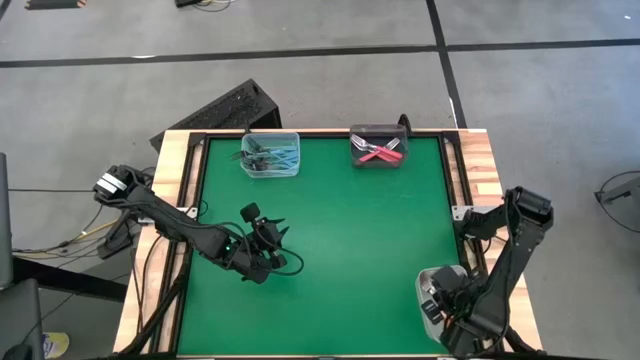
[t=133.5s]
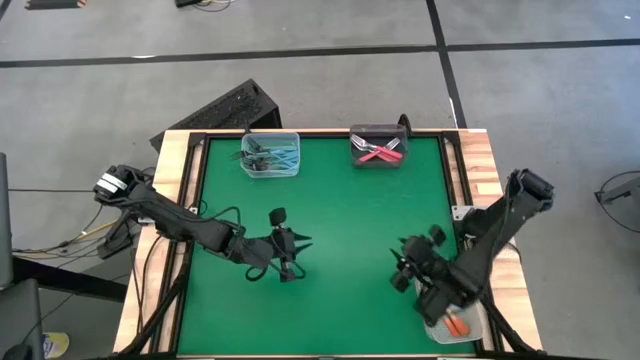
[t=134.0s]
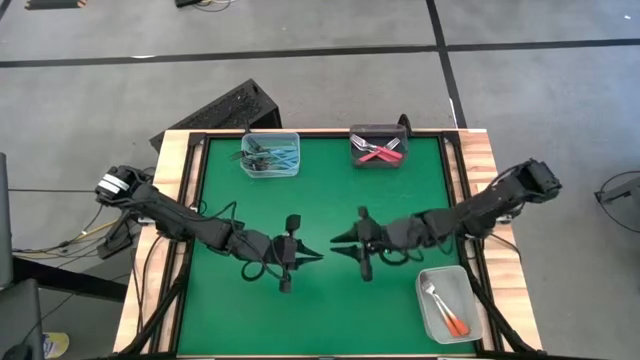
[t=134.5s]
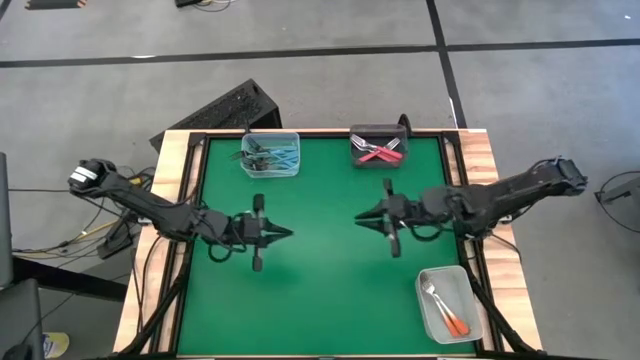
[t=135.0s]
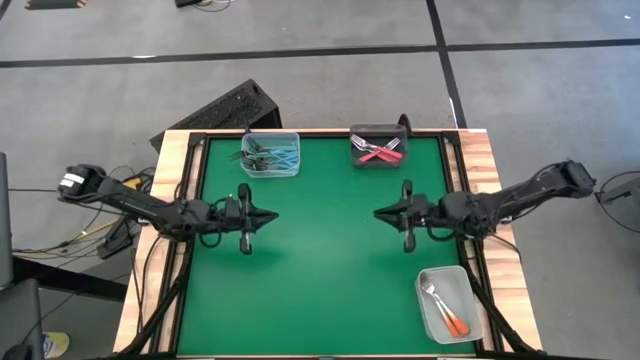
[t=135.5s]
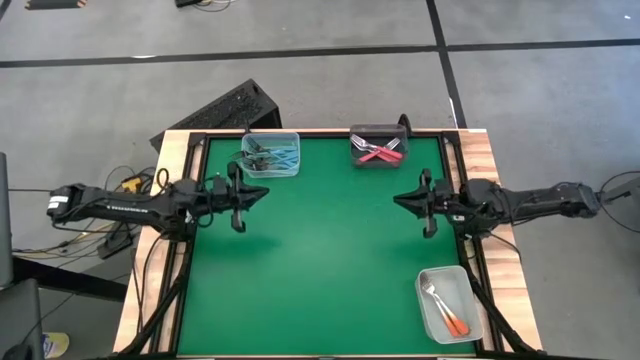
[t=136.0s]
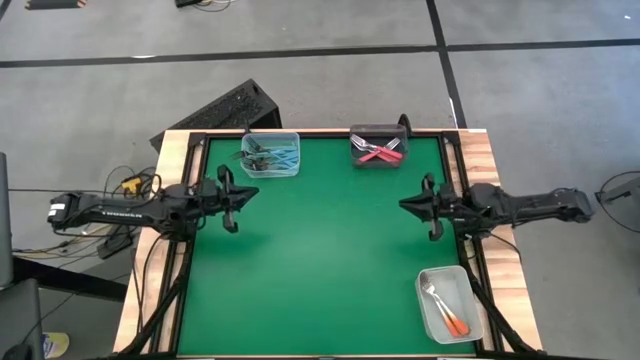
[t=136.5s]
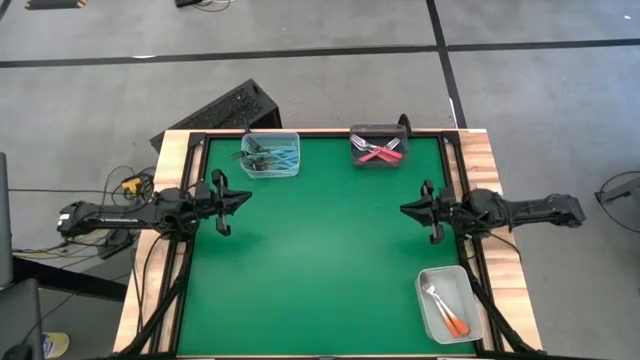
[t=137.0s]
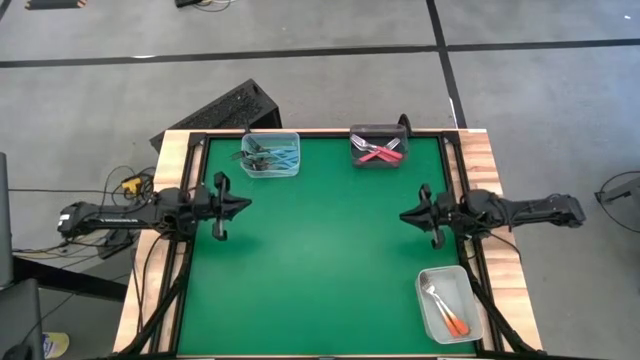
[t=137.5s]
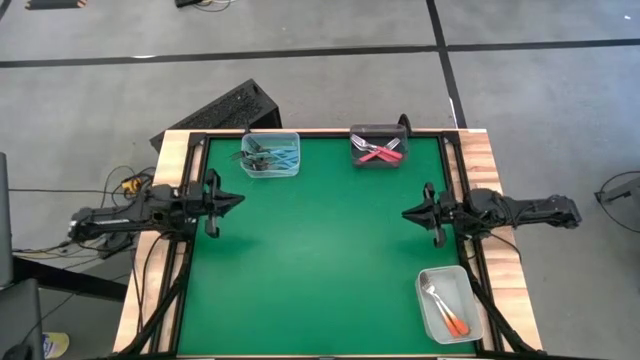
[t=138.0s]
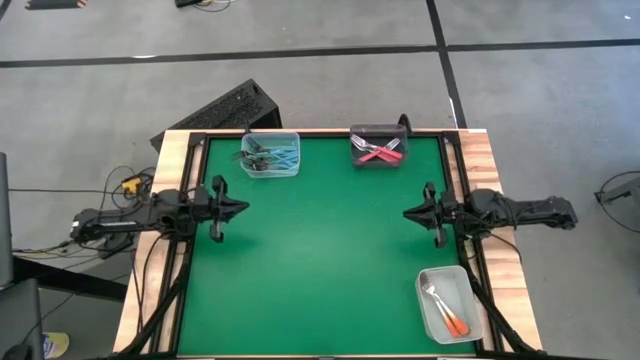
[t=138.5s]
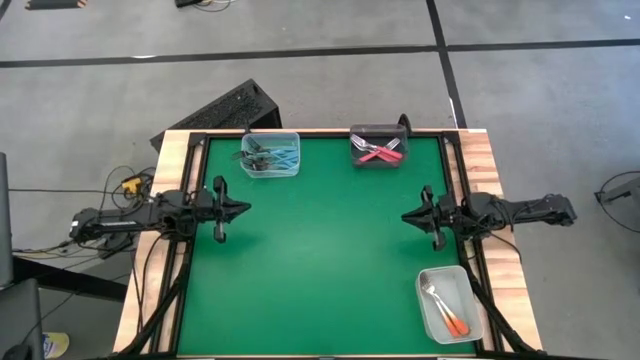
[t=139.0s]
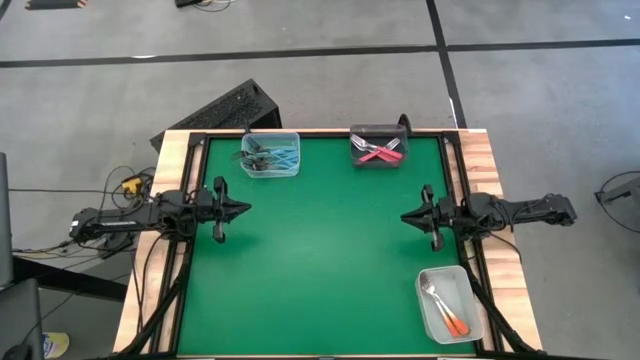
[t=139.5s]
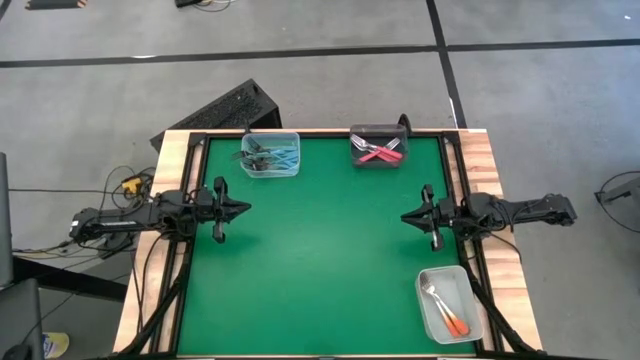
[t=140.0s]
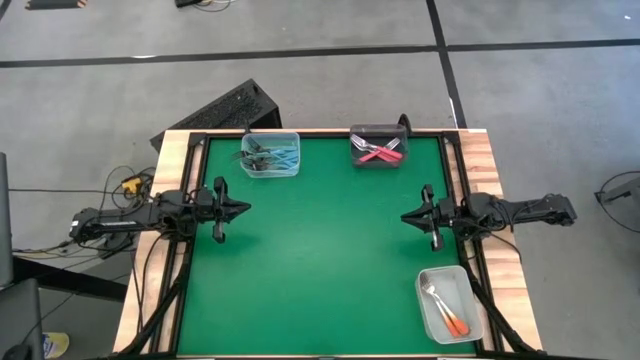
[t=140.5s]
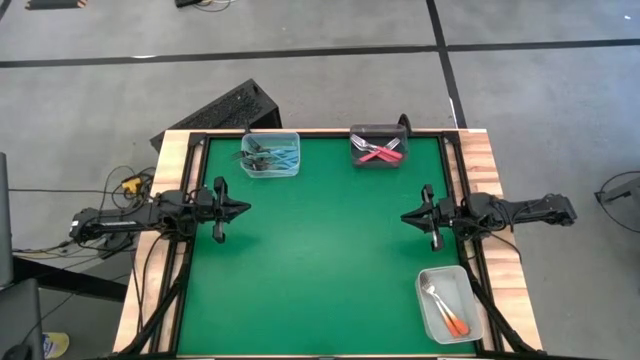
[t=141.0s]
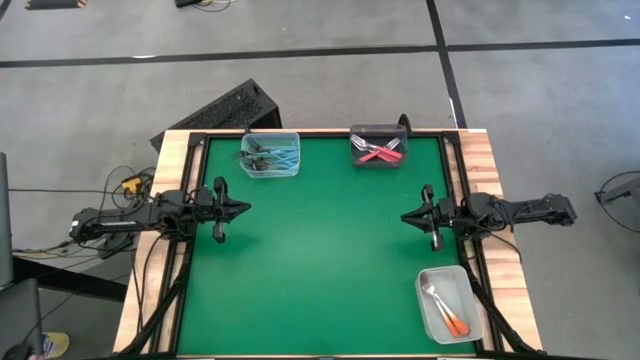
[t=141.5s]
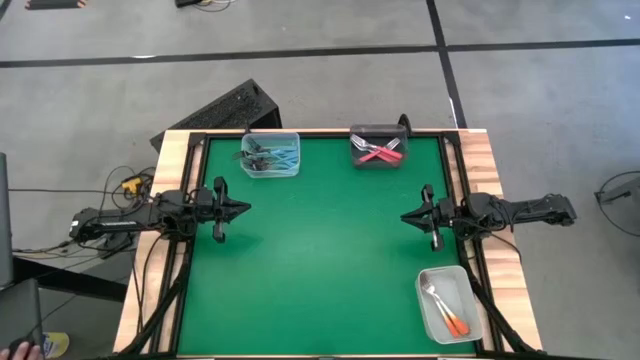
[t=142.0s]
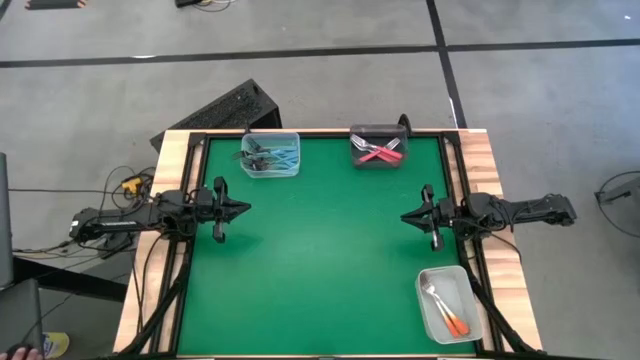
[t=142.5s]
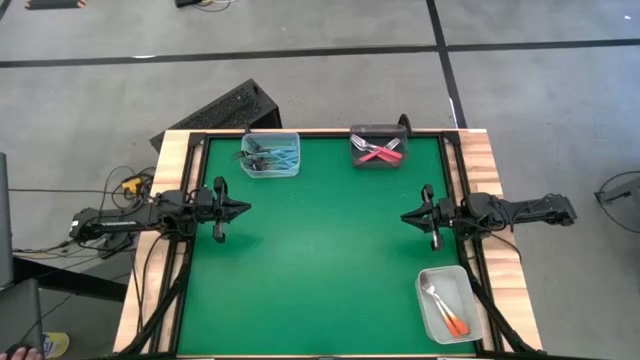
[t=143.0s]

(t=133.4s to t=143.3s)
Task: Sort silverware by color (type)
Return to Home Position

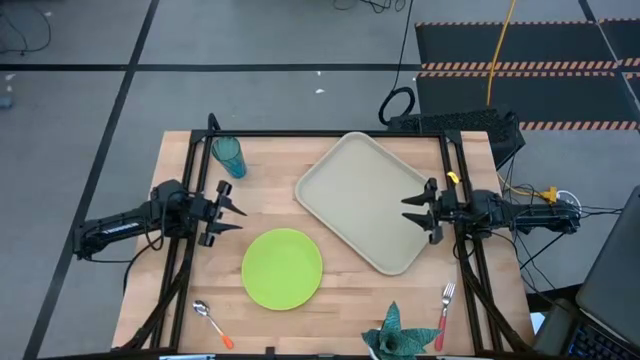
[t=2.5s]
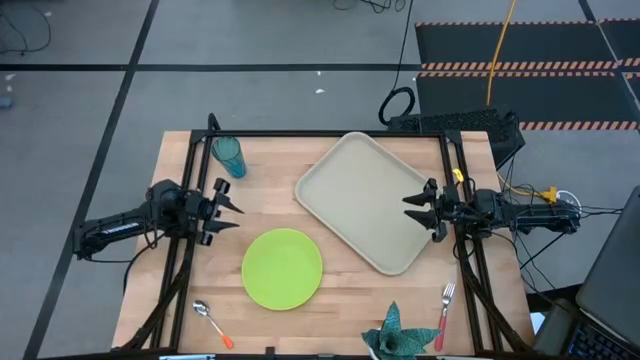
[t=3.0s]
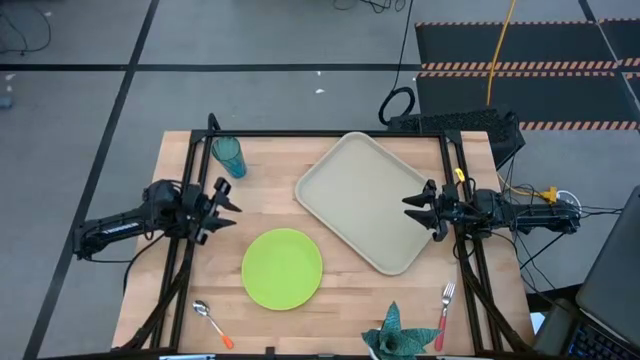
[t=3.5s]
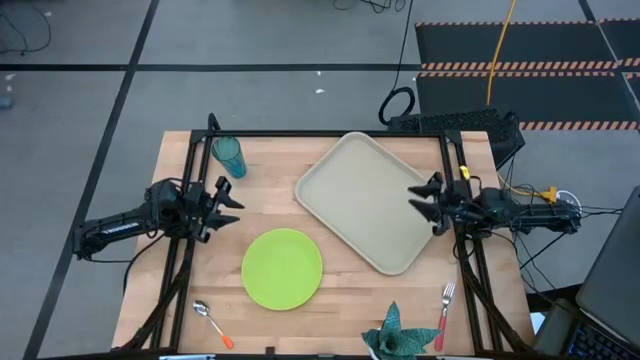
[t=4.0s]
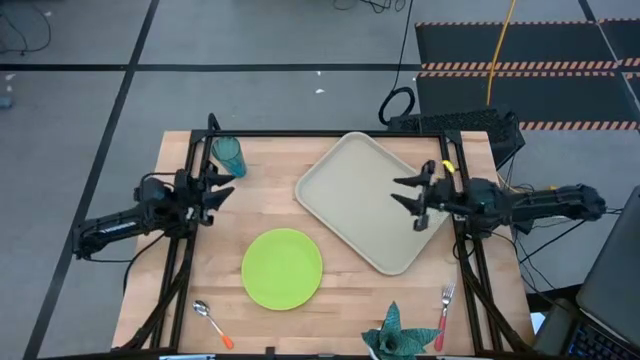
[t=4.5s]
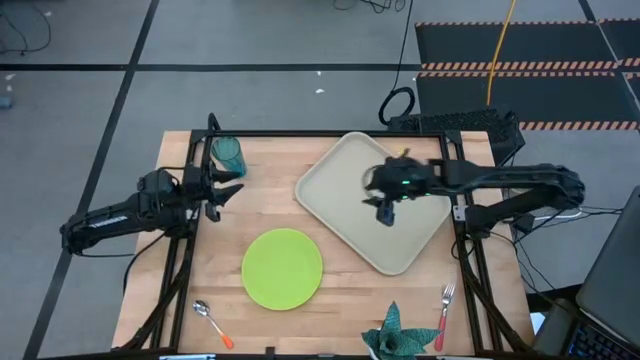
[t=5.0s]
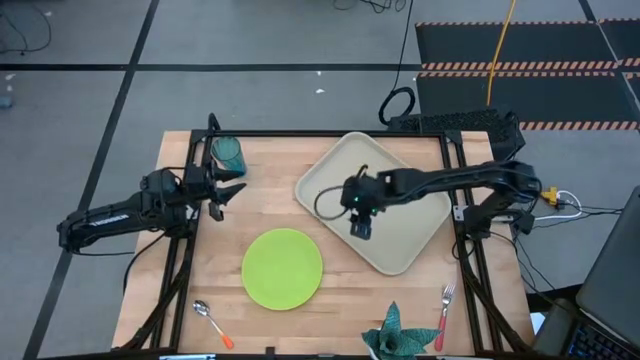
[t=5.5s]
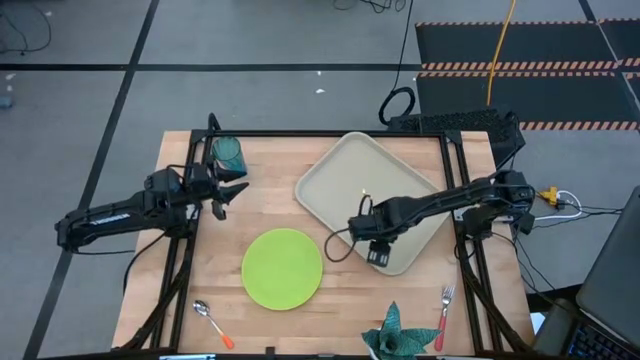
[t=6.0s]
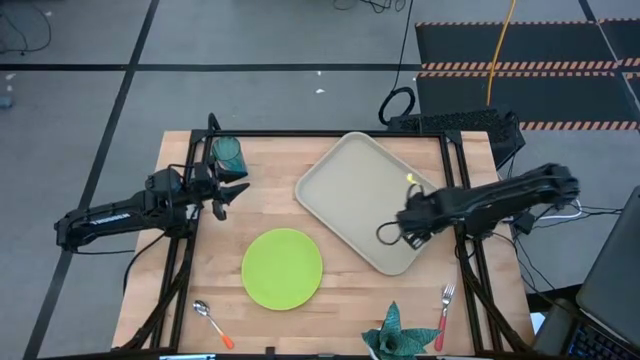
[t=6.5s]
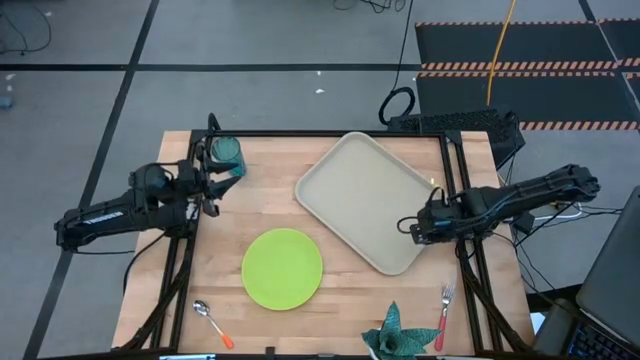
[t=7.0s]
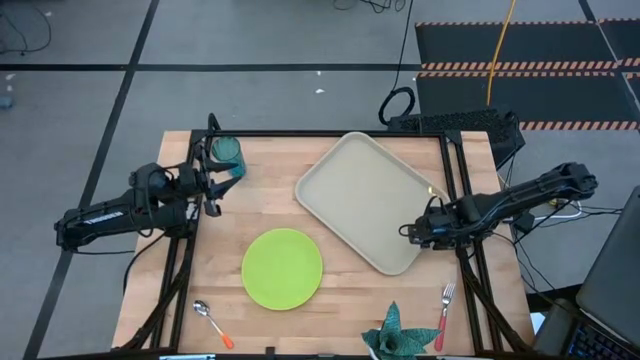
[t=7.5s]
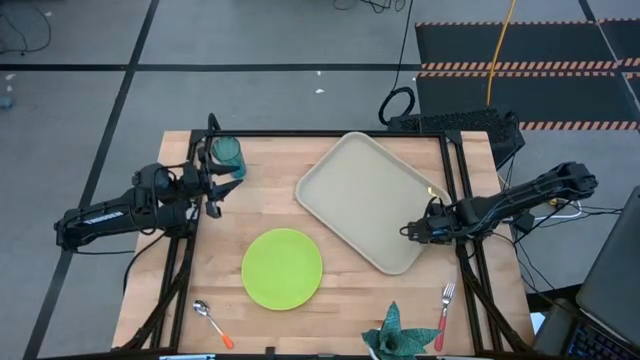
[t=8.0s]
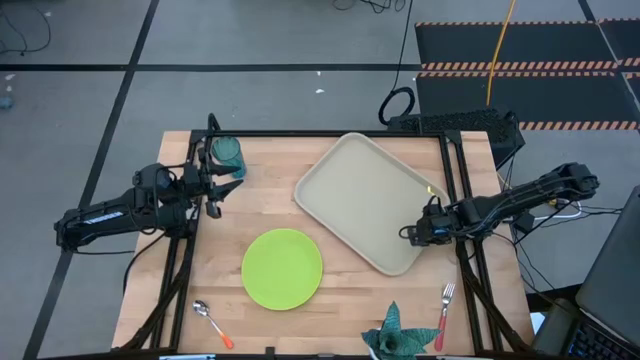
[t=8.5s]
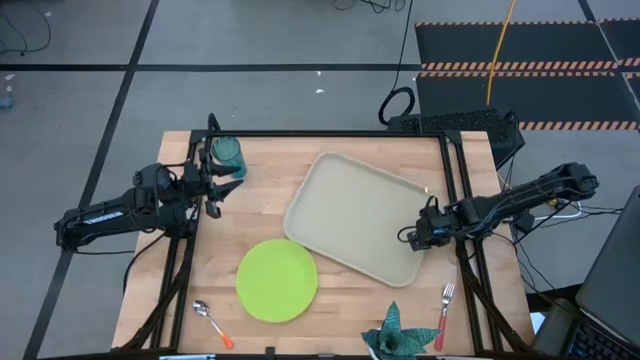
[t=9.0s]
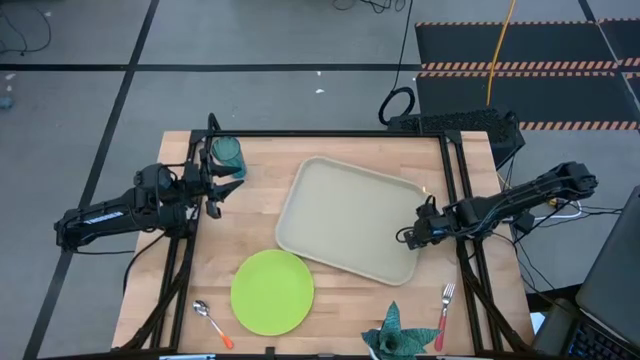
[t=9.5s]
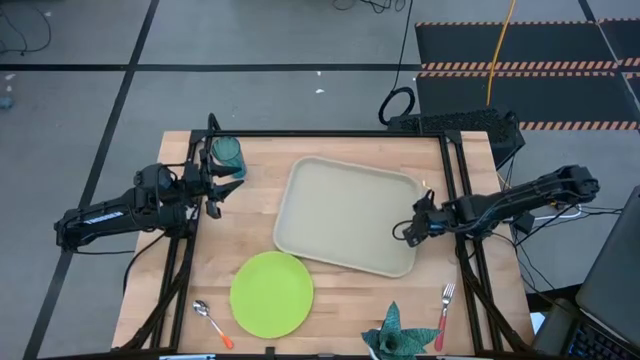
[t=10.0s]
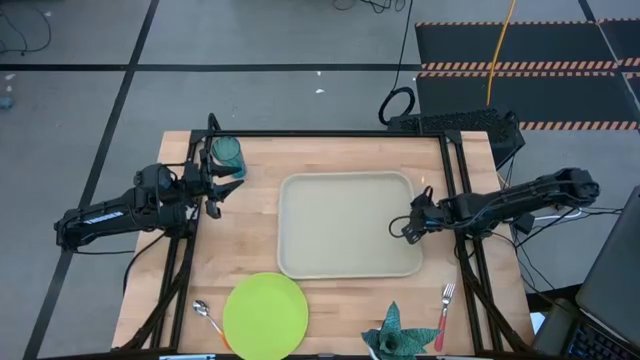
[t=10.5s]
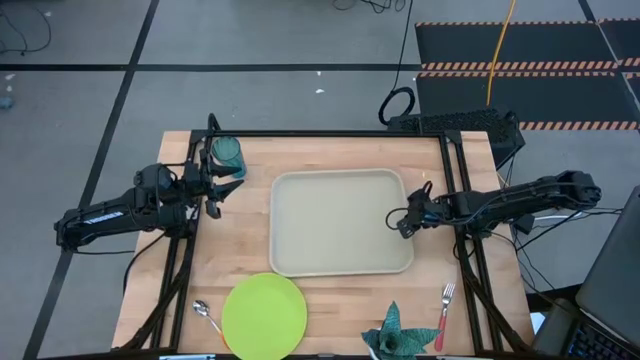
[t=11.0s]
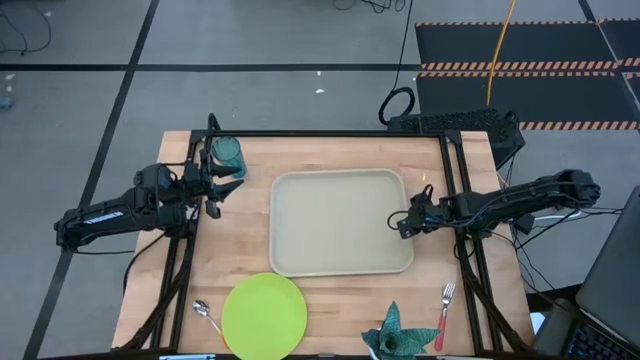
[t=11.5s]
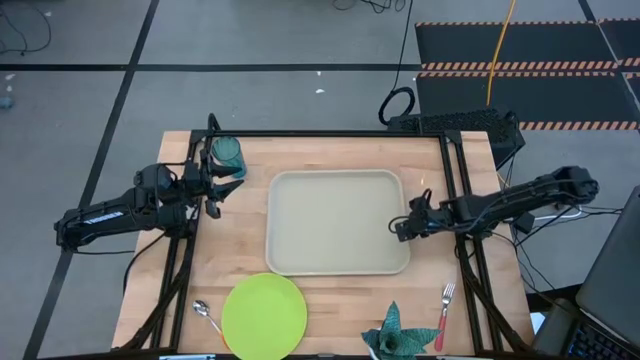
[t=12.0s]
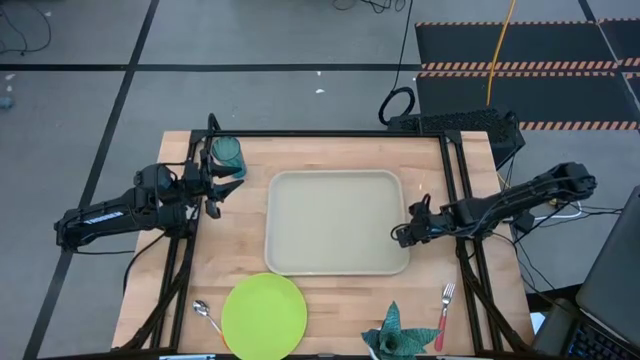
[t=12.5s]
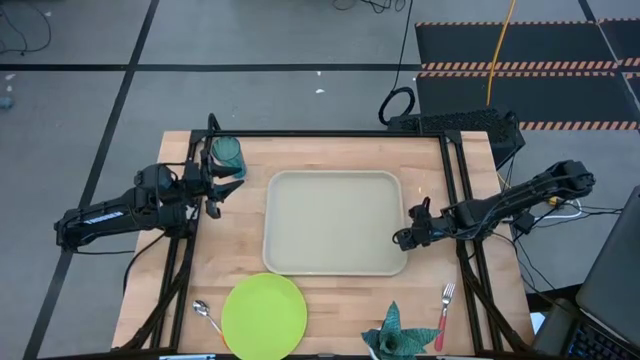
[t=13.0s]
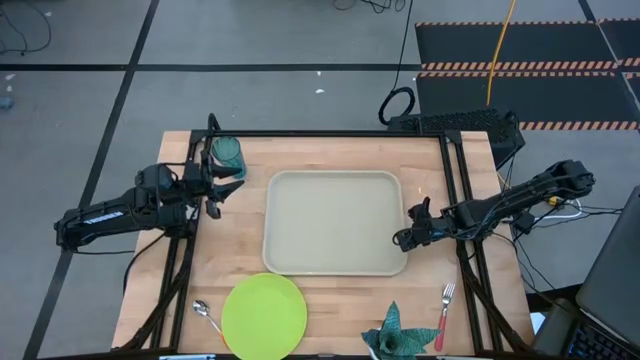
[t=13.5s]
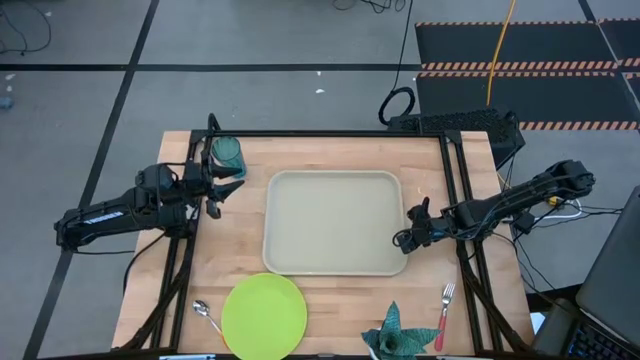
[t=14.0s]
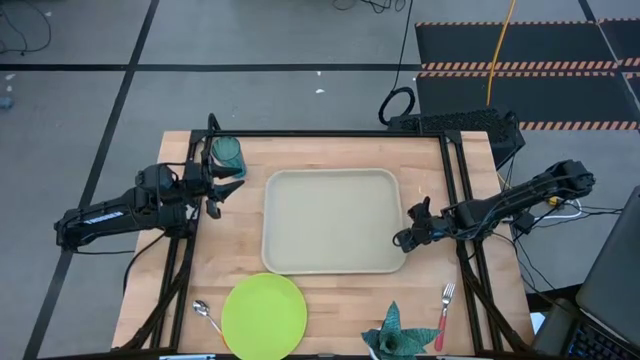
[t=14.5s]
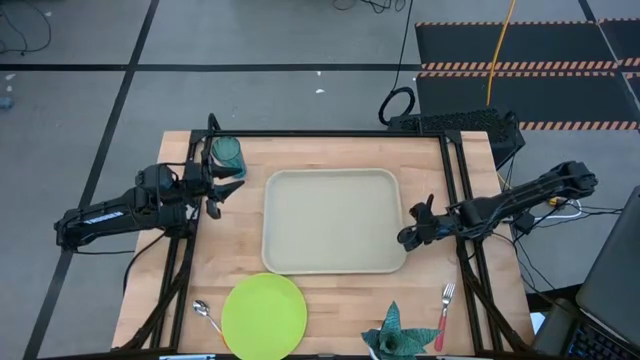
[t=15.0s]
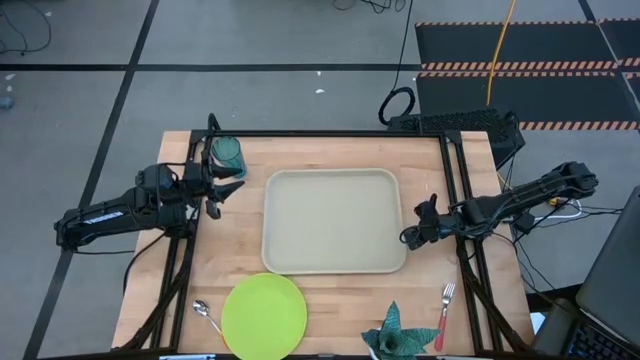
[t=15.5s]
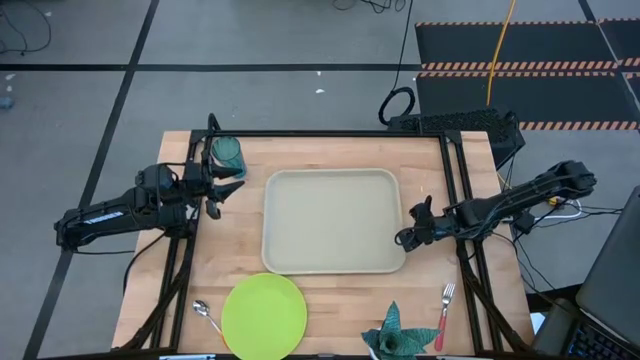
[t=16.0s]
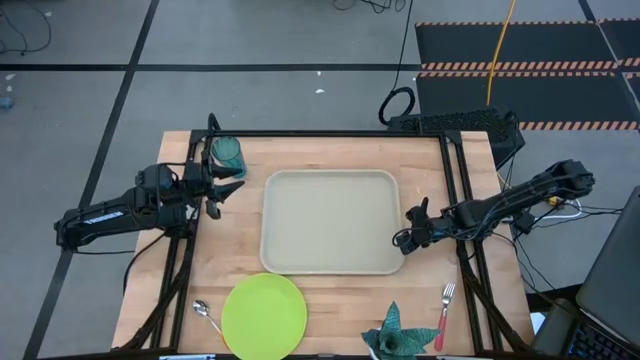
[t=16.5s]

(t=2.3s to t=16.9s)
Task: Pick and place plate/cup/fork/spoon on tray
Prepare the light brown serving tray
